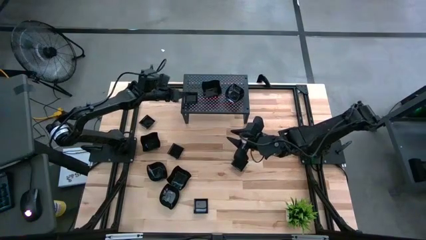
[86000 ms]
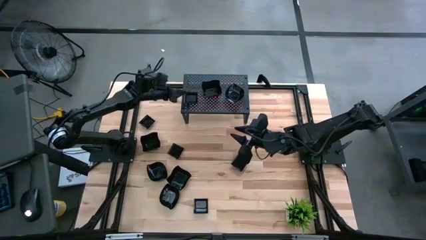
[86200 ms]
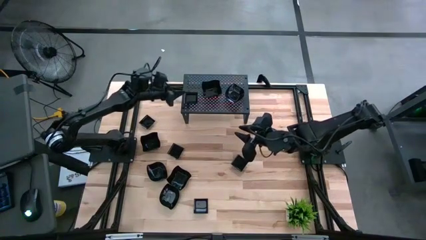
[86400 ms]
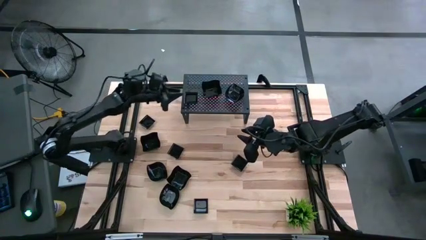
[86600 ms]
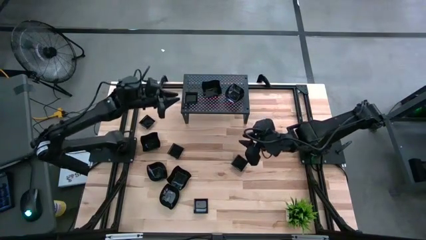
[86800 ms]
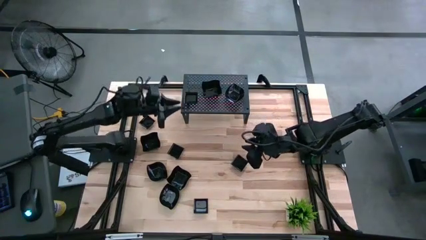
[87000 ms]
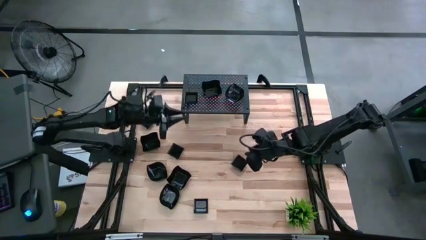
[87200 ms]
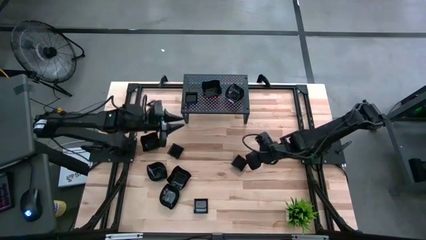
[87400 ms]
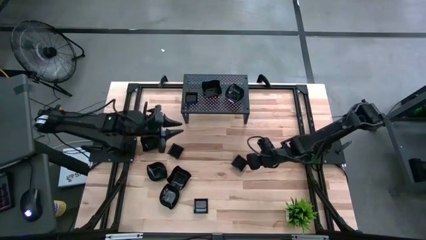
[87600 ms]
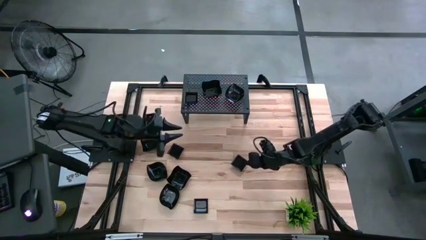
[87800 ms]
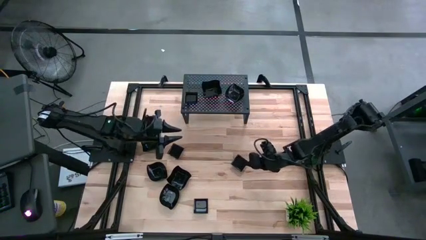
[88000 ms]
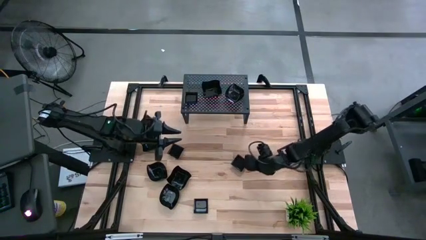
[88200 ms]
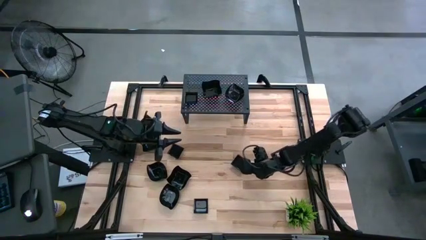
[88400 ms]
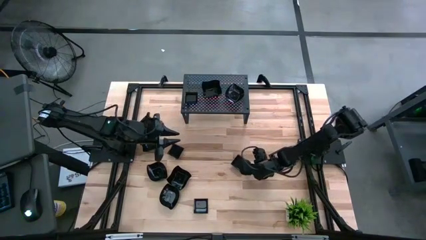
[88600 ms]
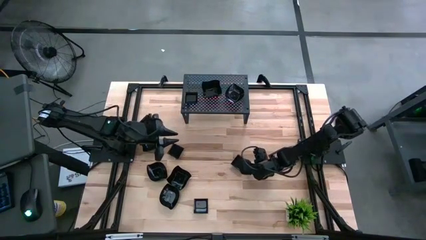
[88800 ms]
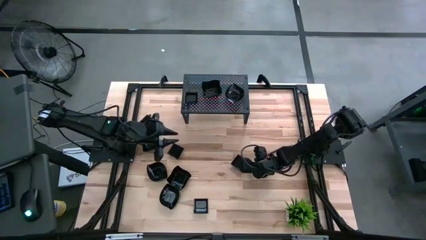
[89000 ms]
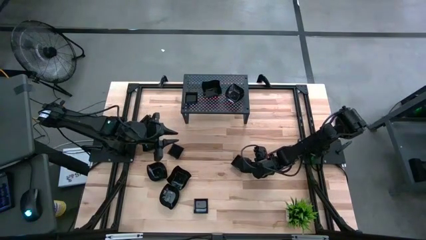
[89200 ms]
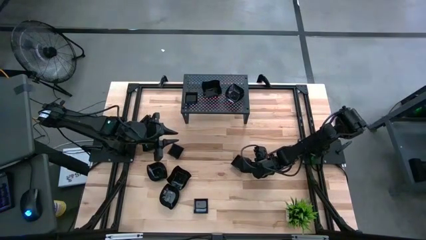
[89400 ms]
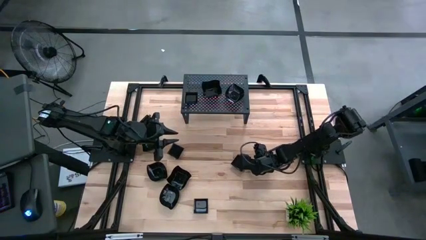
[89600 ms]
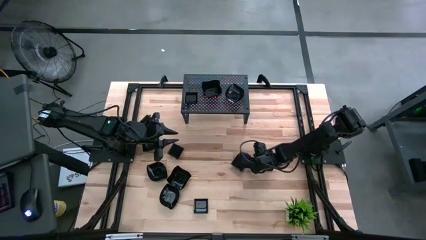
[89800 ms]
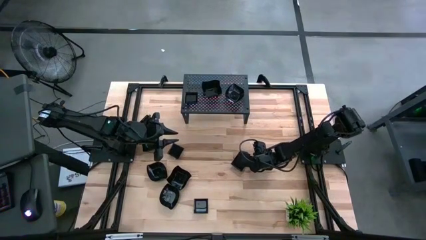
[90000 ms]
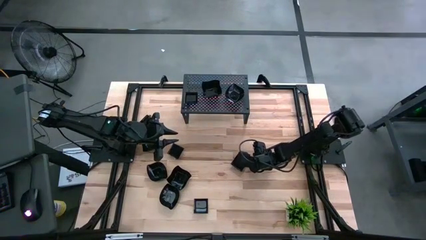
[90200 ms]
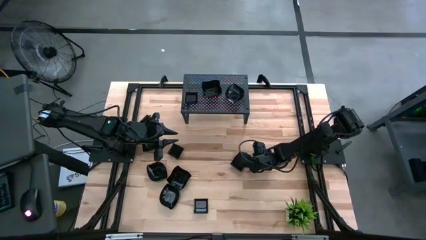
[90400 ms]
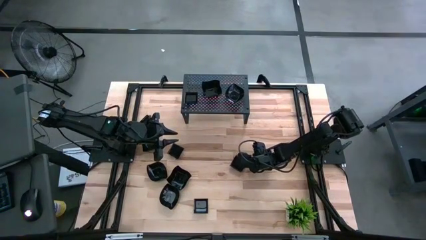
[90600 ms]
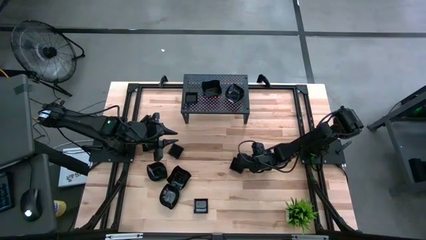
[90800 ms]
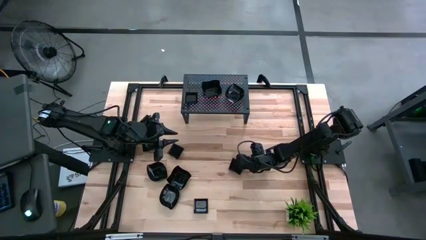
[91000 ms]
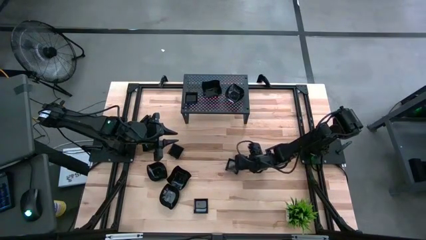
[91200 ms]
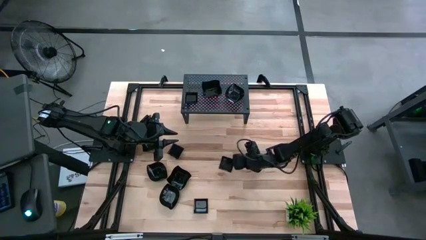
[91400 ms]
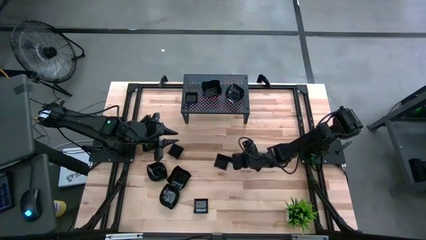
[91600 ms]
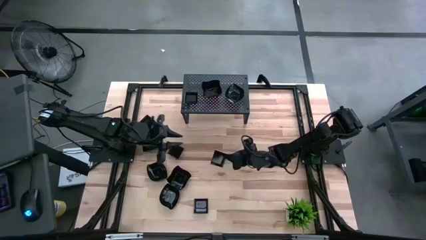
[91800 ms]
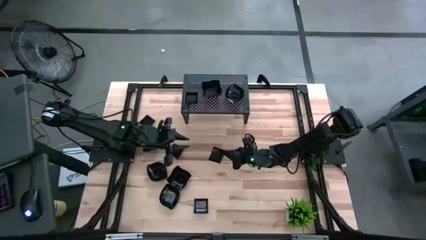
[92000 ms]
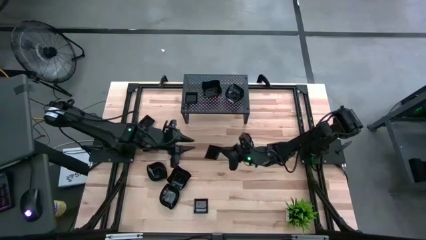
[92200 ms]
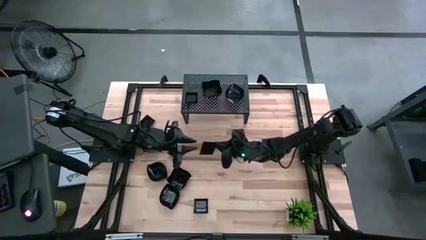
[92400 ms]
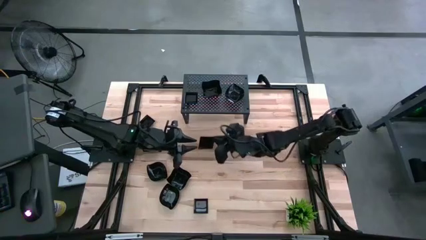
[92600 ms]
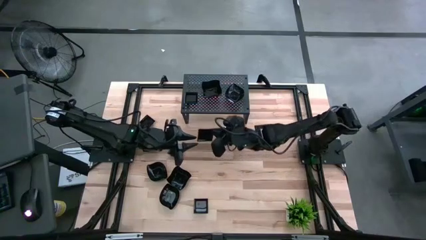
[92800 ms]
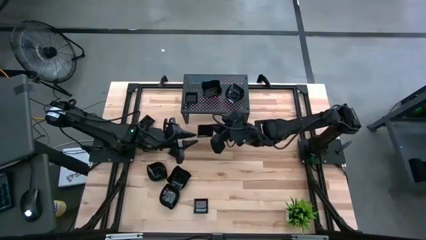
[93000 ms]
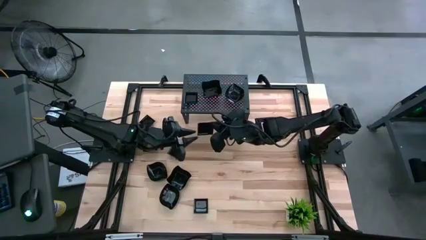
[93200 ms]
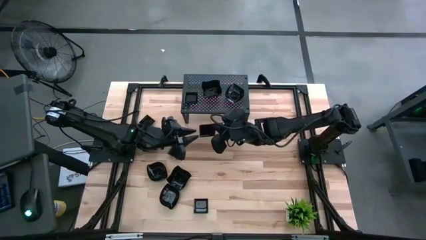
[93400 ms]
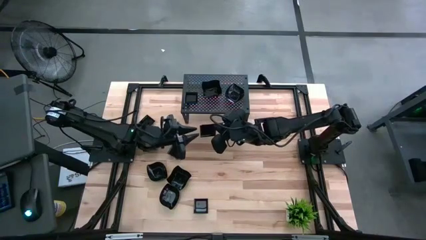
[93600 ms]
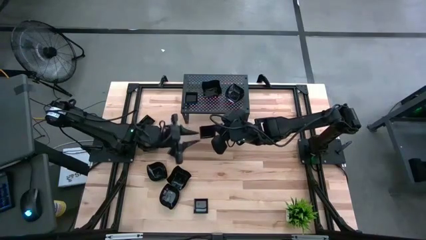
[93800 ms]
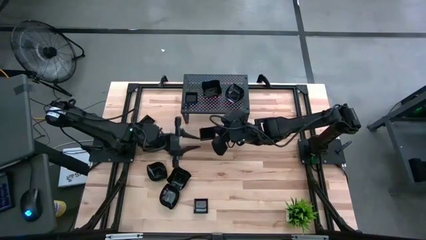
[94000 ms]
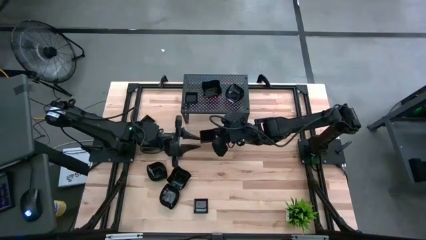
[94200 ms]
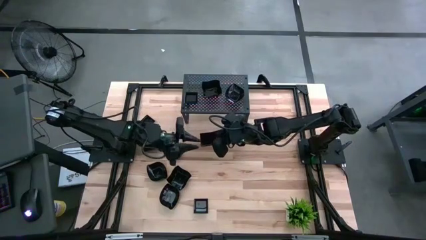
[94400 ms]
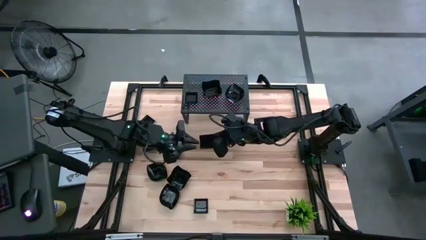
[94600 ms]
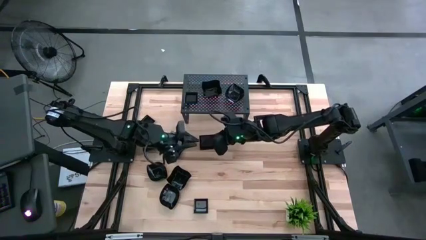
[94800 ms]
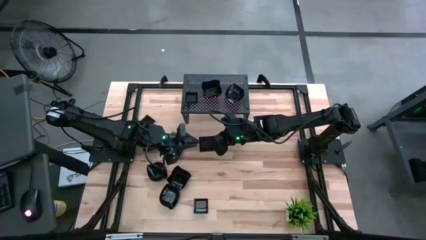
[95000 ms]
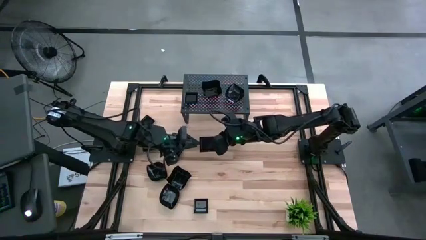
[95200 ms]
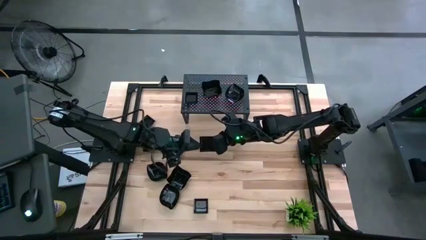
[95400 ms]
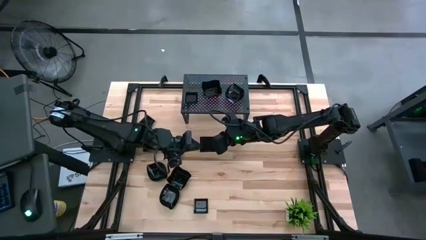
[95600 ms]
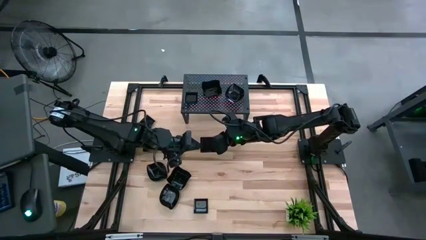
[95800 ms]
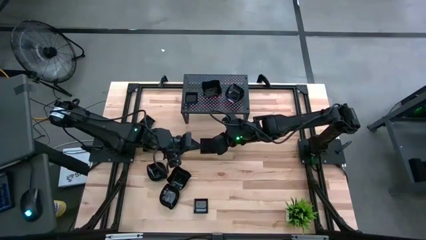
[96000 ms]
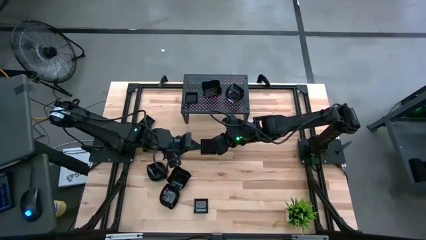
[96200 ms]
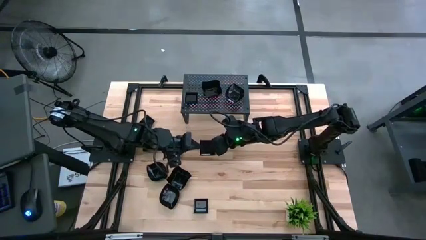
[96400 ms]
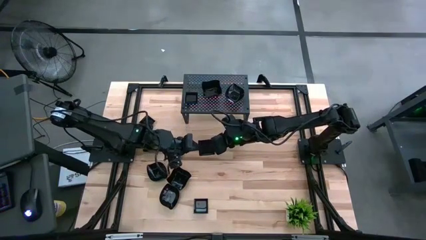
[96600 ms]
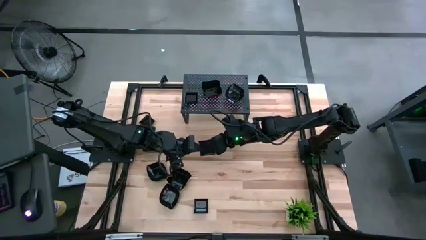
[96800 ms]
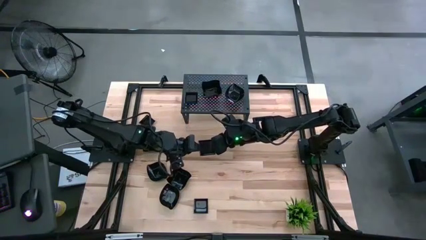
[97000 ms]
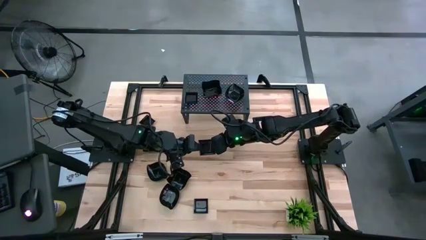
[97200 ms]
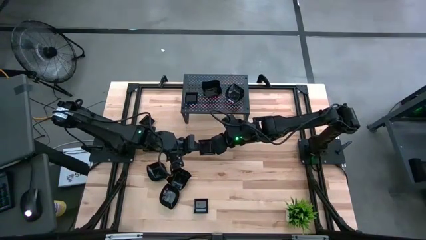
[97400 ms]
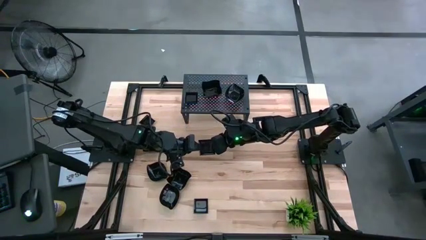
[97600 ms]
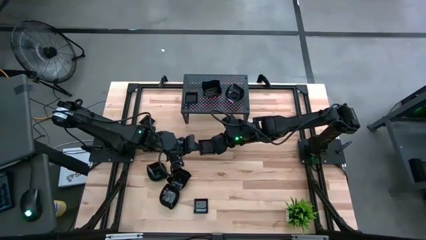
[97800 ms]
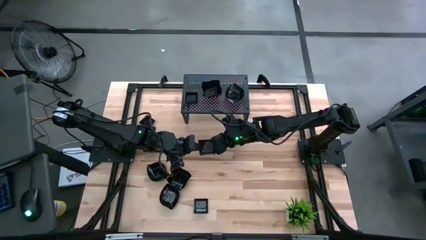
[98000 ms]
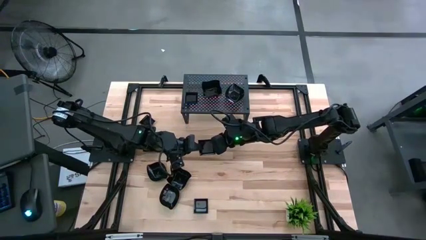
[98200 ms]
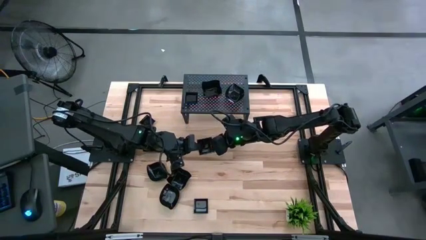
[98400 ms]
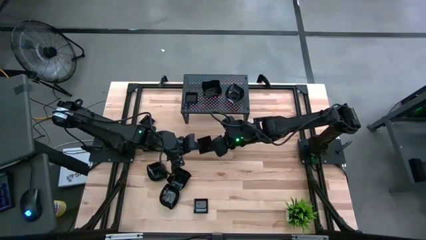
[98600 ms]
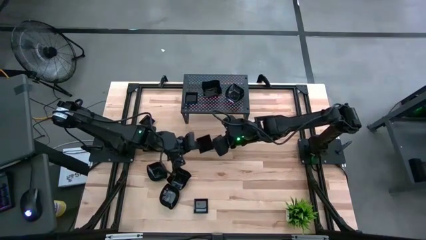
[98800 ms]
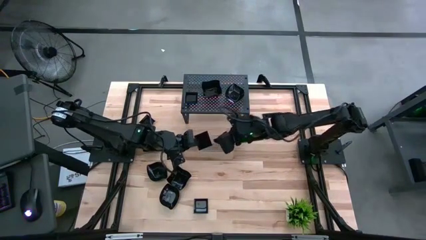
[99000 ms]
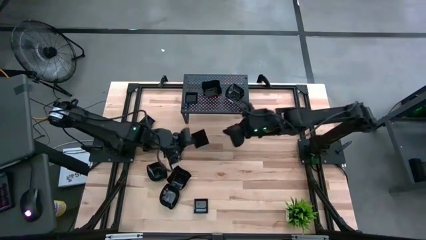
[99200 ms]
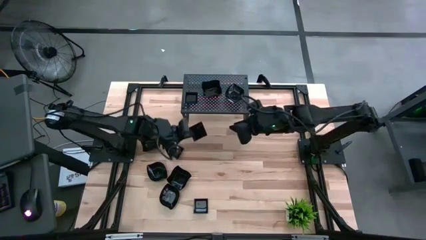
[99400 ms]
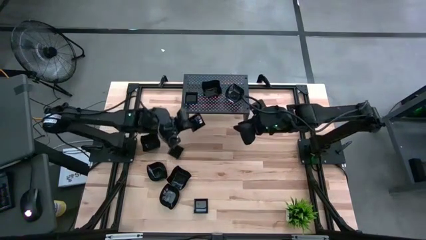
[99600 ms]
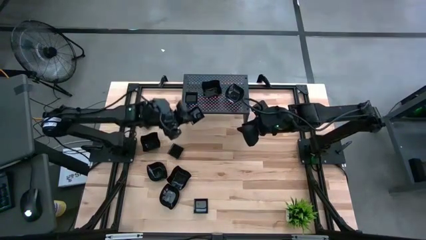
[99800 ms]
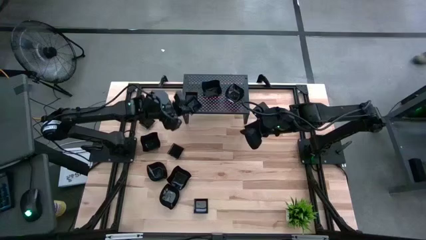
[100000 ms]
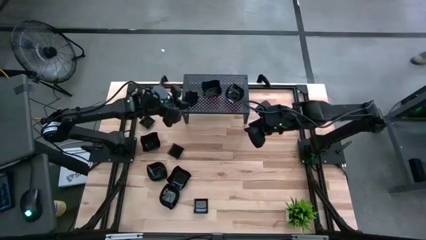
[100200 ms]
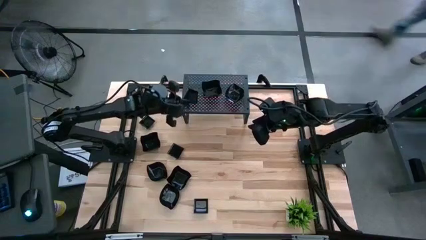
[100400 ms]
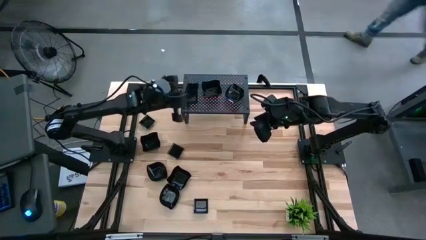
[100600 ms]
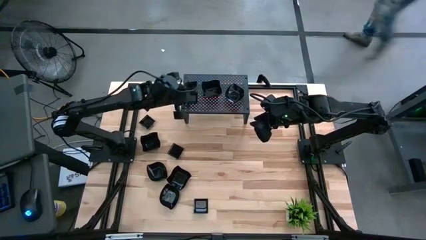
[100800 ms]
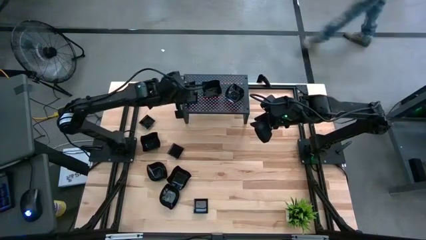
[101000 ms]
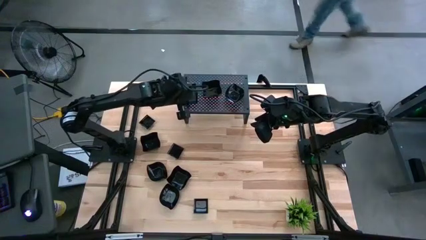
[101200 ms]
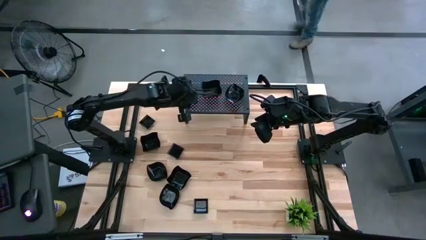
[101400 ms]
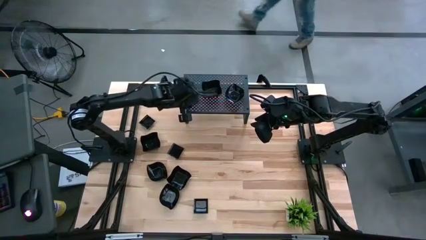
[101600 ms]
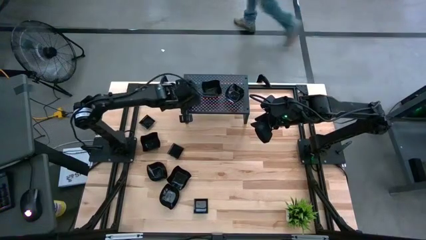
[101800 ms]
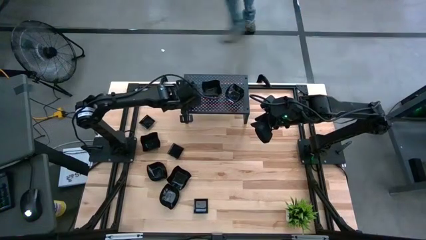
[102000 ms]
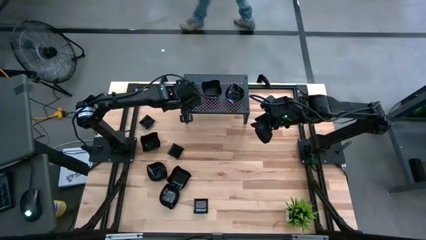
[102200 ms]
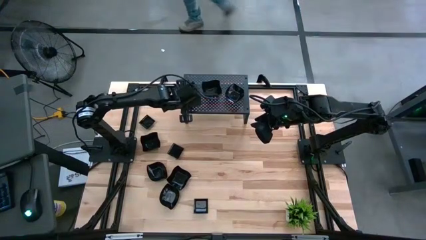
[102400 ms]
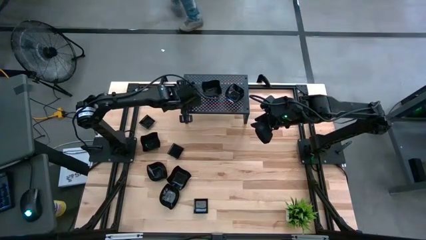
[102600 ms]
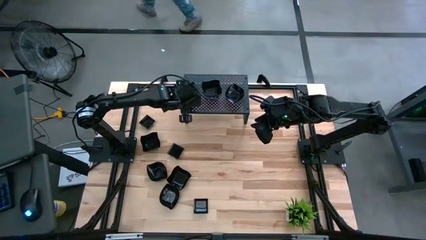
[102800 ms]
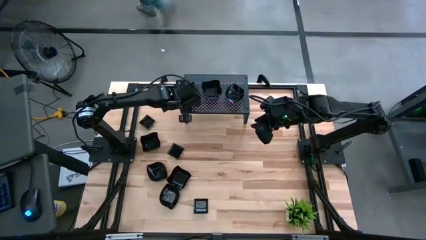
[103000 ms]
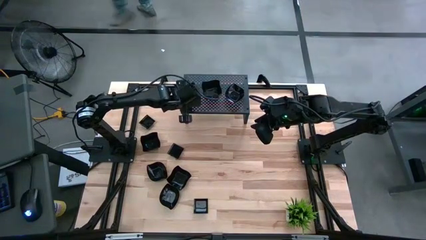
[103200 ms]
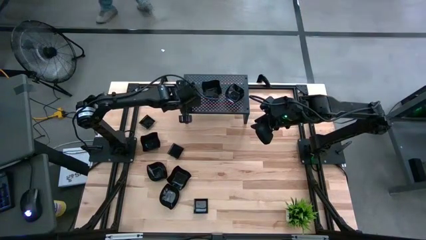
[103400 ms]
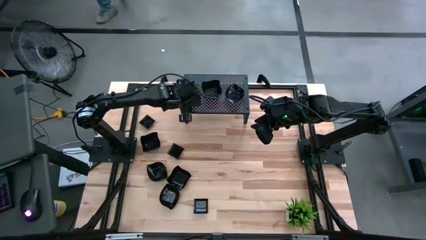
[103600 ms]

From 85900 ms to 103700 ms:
Task: Pick & Place Mini shaped plates
Stack the square plate on top of the square plate on the shelf
